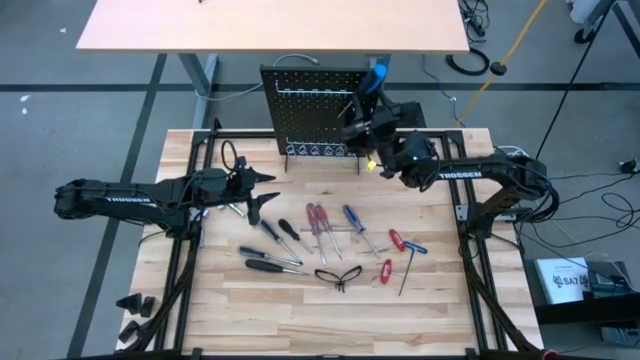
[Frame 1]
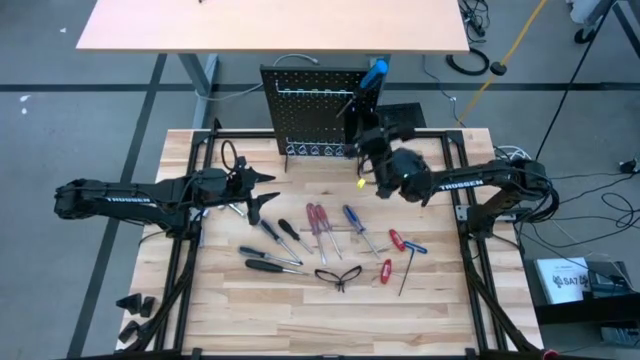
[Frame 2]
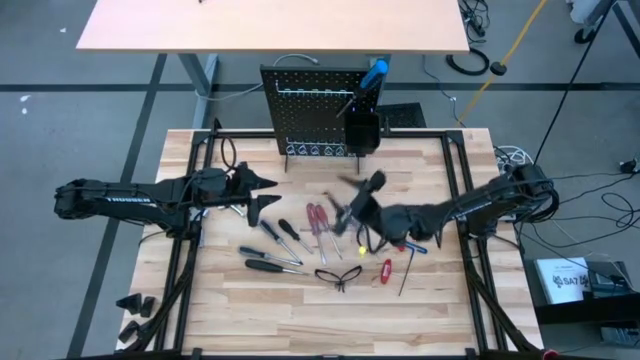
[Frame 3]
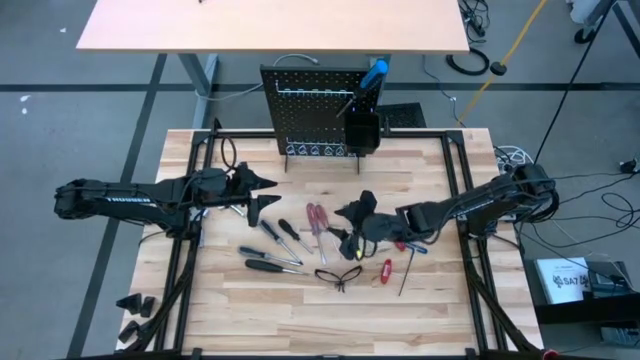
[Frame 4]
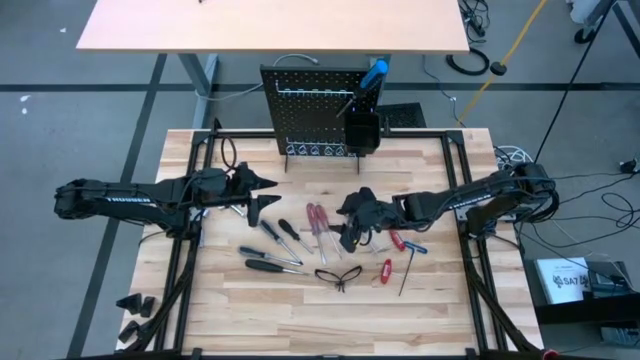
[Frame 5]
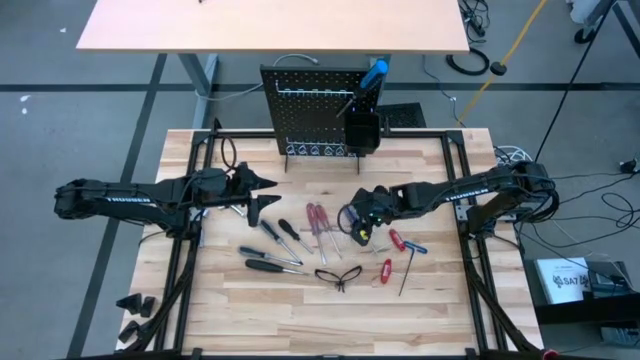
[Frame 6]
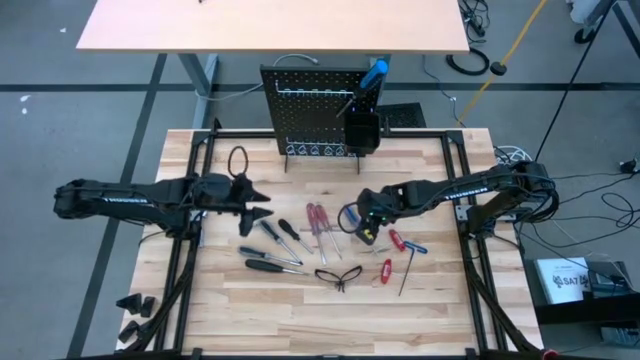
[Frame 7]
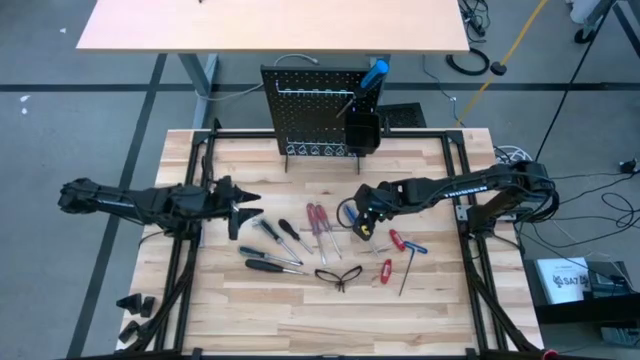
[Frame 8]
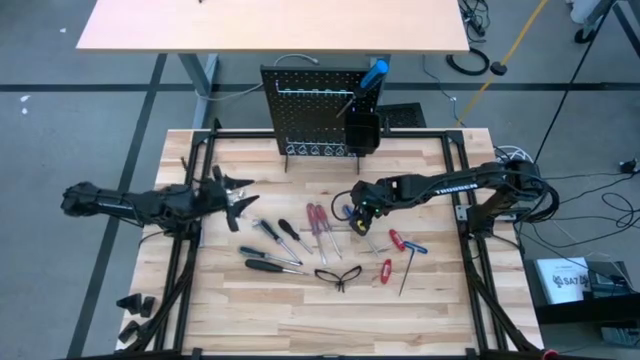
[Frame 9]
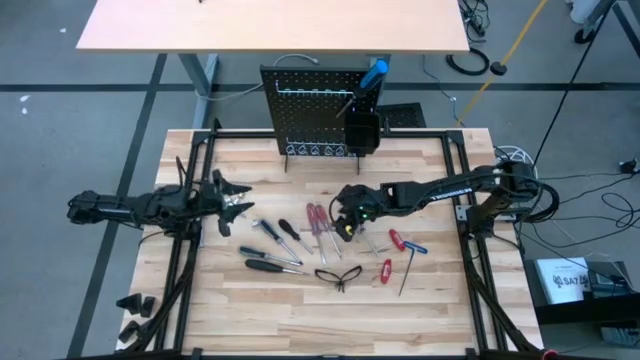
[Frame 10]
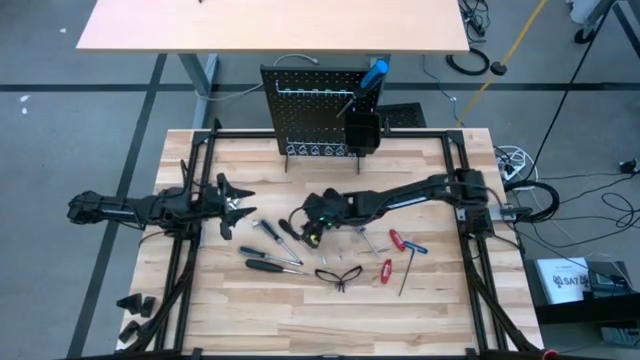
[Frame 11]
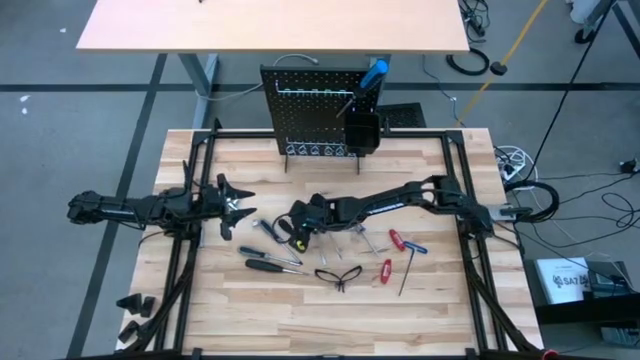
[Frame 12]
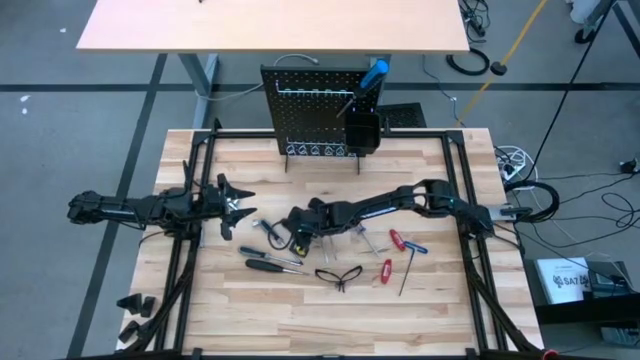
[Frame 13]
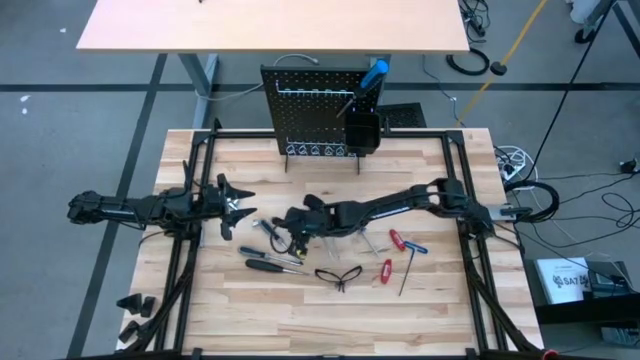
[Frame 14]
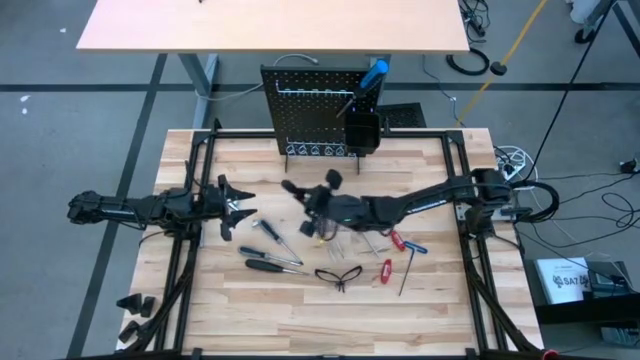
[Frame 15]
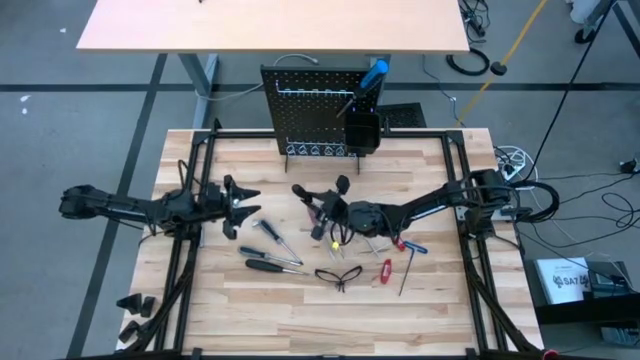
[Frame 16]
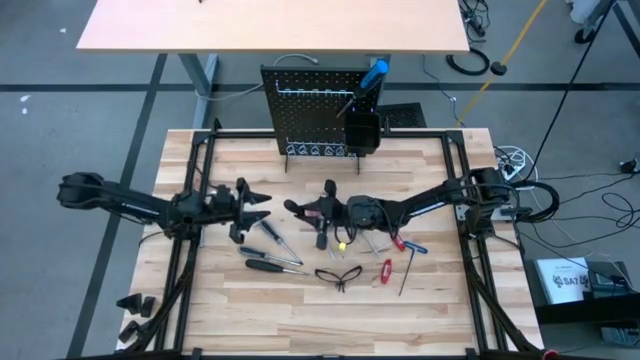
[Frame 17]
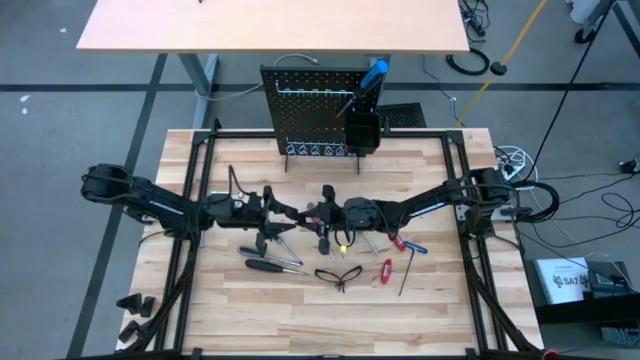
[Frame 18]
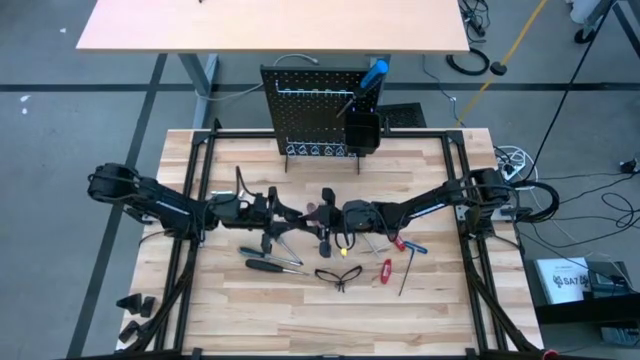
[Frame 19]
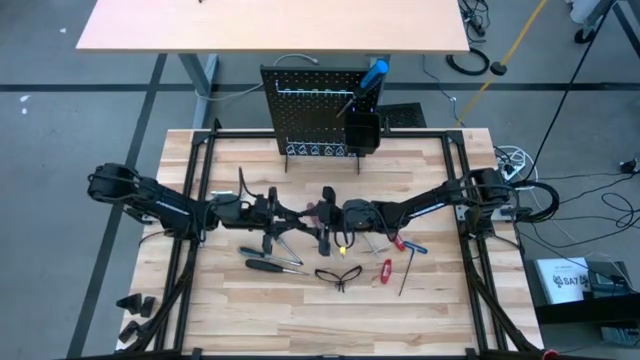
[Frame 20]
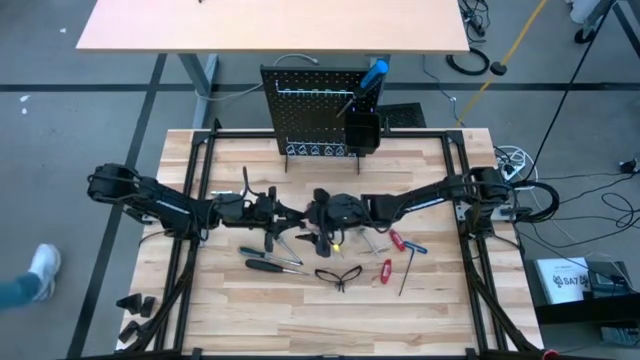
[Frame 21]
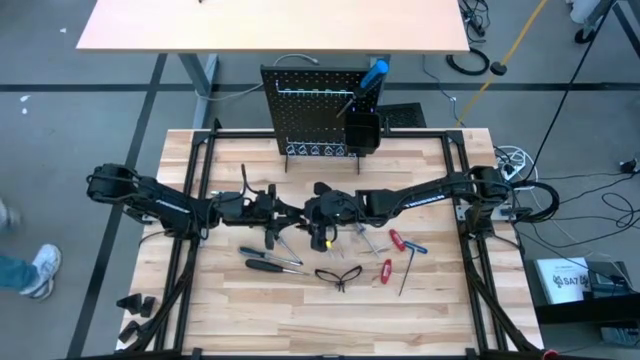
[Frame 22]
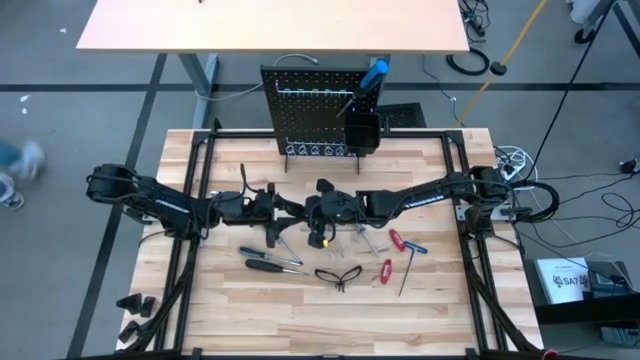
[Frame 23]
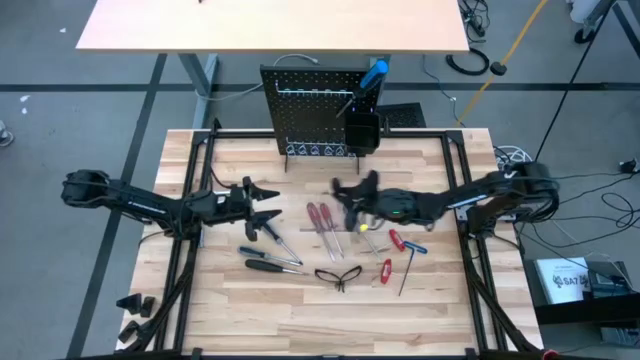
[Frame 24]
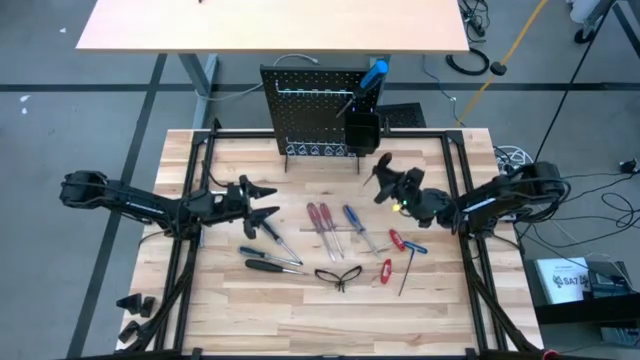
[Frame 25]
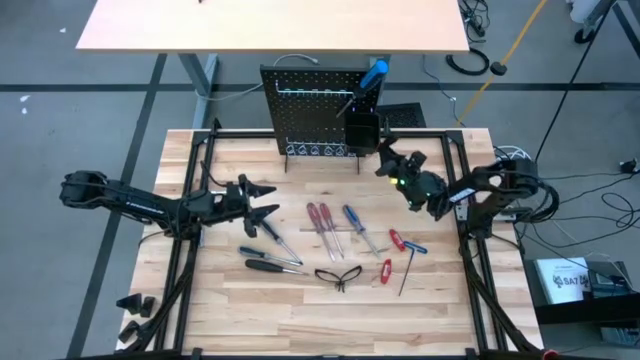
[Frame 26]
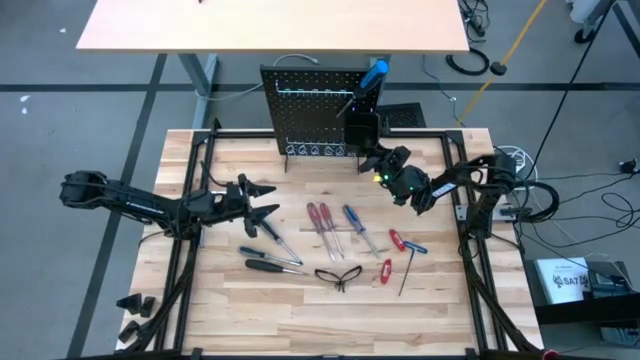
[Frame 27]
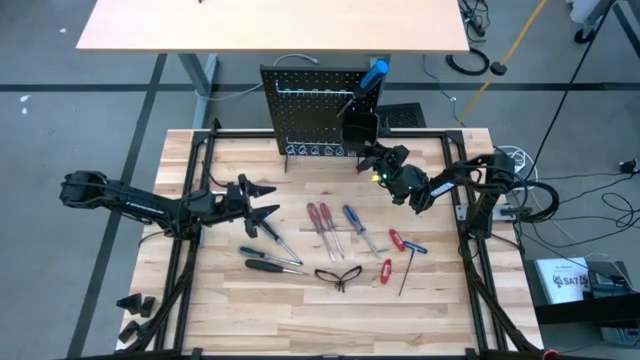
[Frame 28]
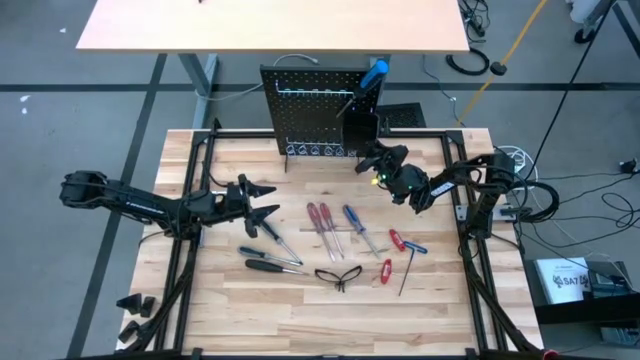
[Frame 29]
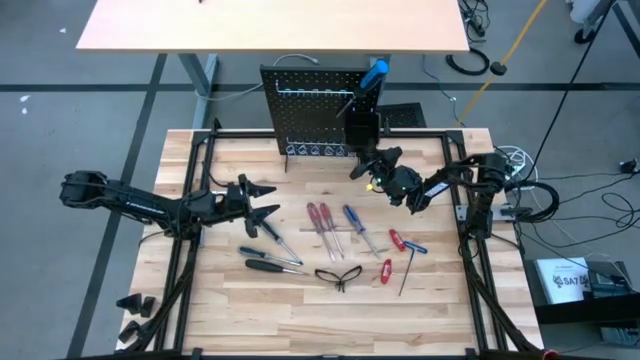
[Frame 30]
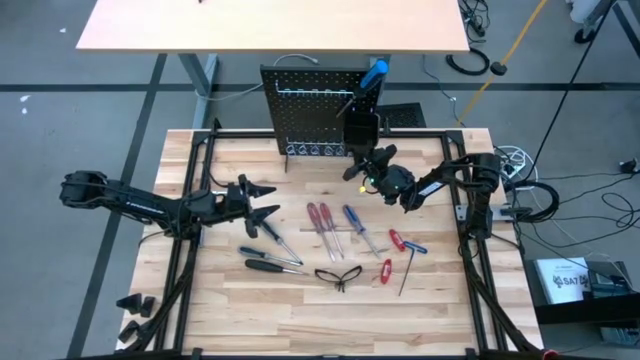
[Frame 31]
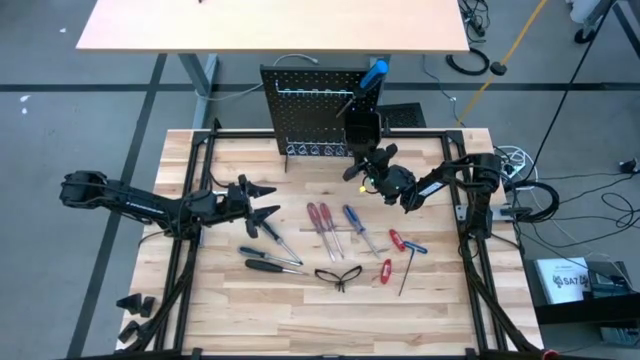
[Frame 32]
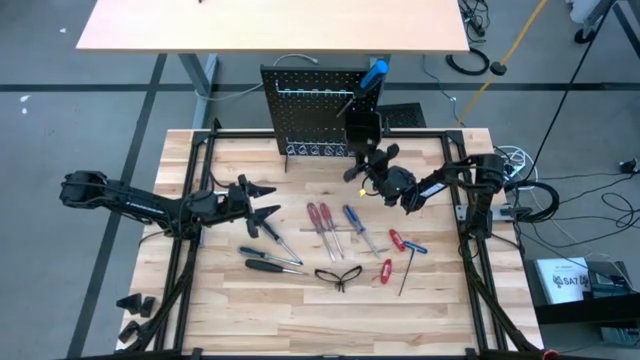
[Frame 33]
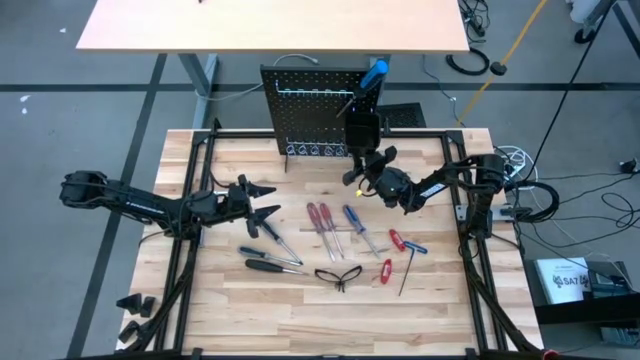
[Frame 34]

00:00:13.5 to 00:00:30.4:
Task: Hang tools onto peg board
Hang the black screwdriver onto the peg board

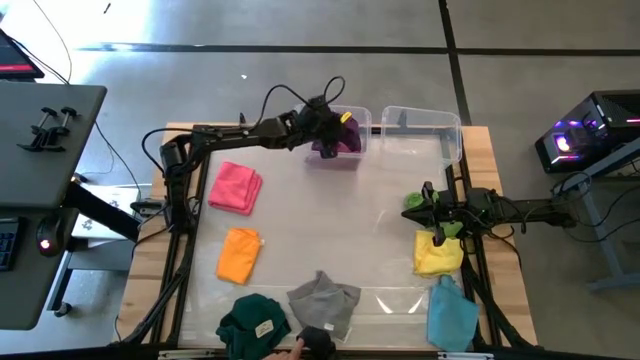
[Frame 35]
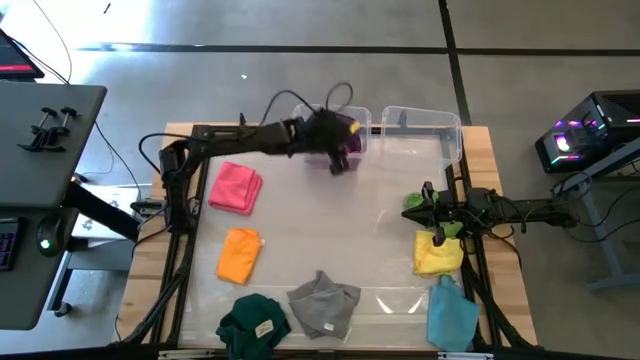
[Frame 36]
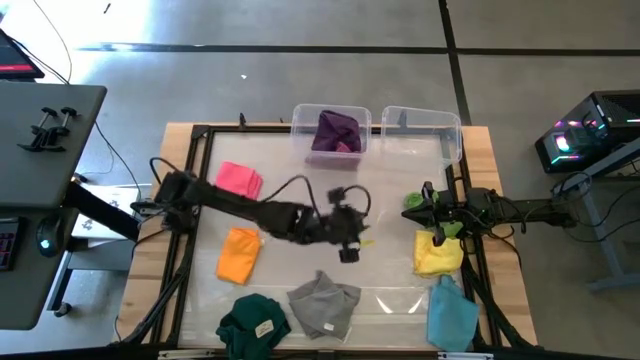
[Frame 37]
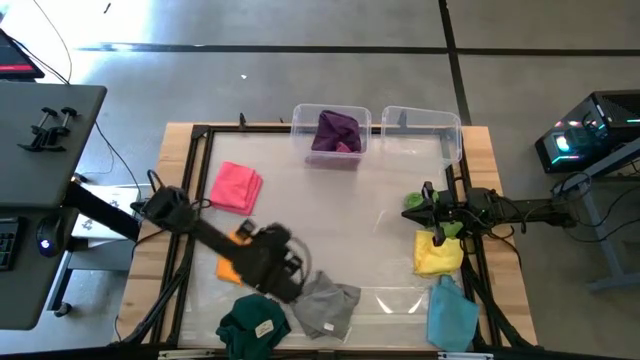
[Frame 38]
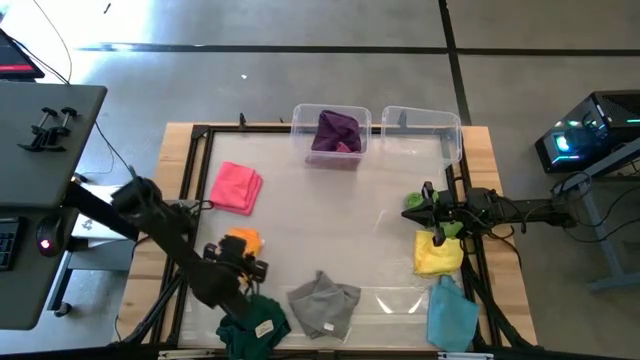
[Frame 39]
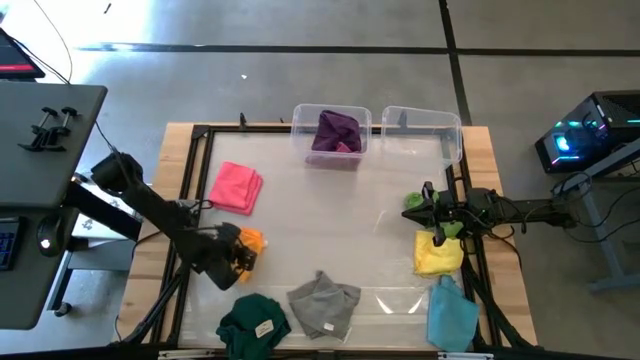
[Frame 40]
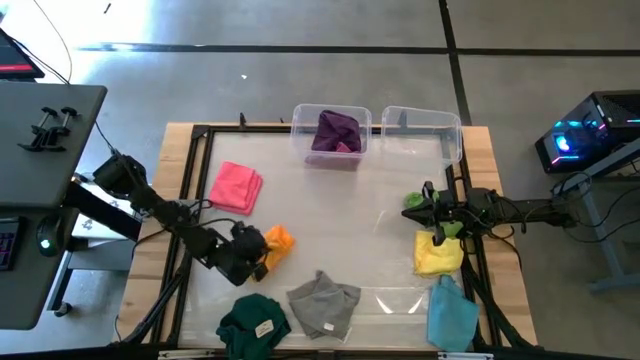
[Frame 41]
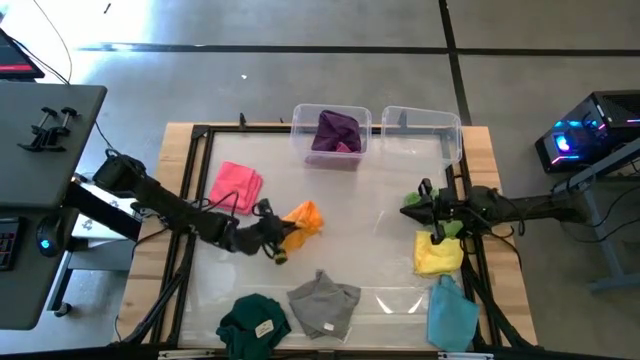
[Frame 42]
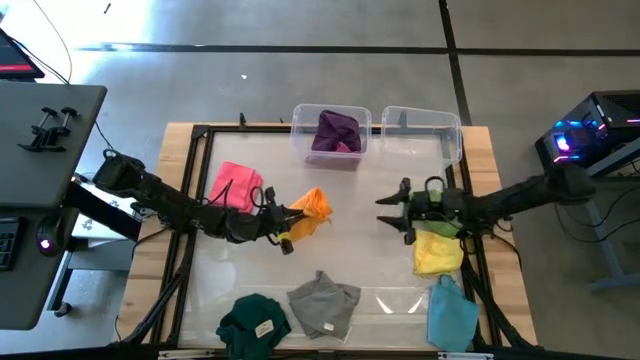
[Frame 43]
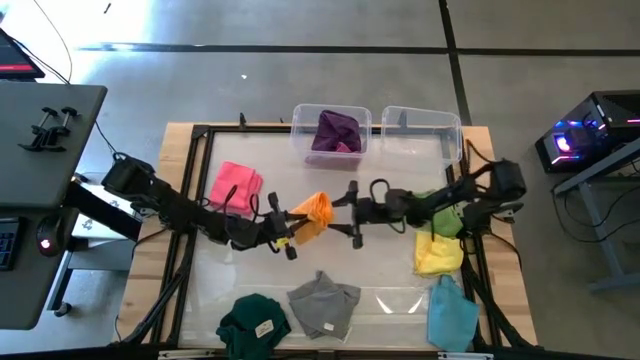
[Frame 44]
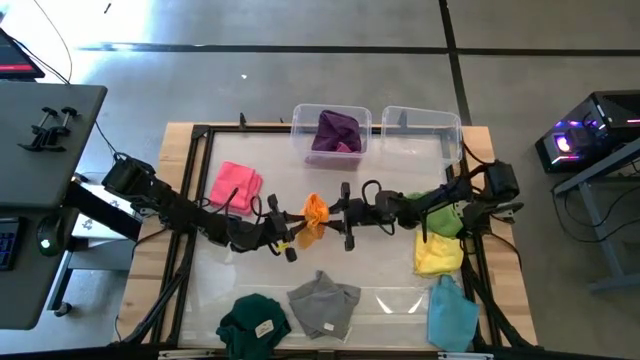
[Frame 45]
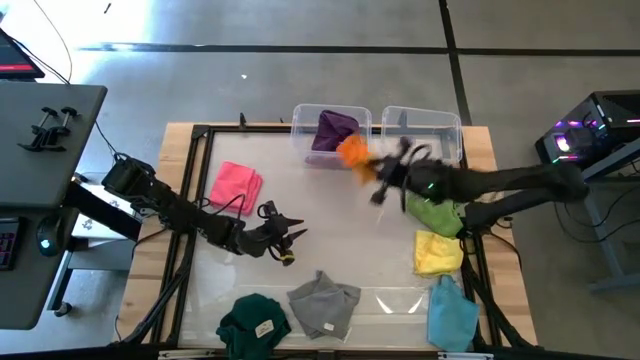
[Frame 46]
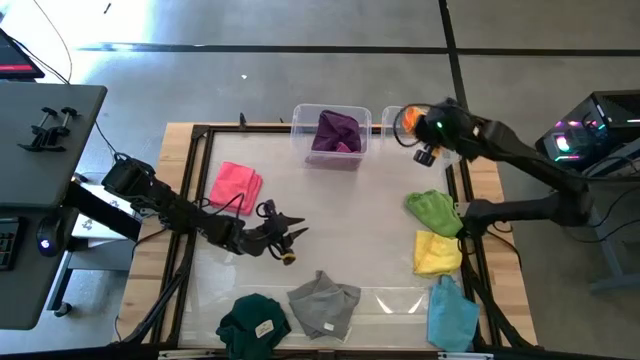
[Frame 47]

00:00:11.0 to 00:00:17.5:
Task: Sort towels by color in basket
Put the orange towel into the right transparent bin
